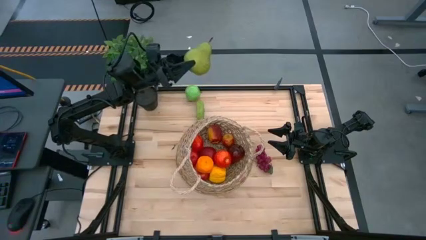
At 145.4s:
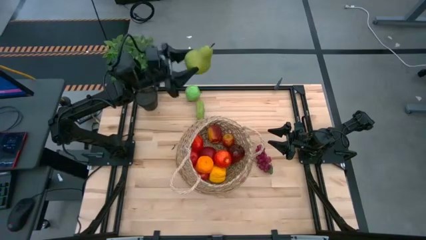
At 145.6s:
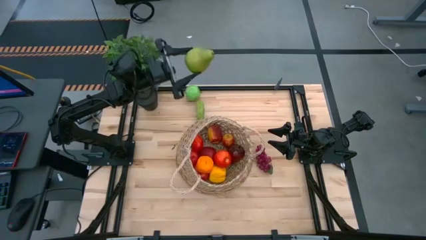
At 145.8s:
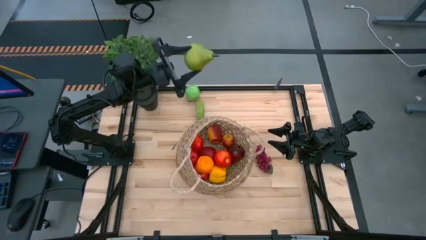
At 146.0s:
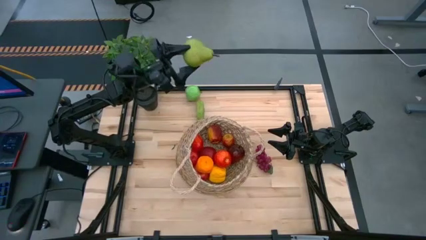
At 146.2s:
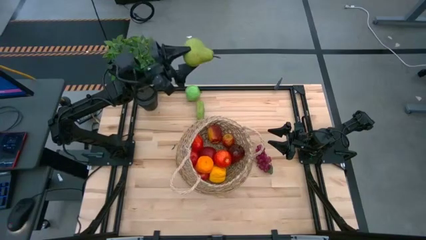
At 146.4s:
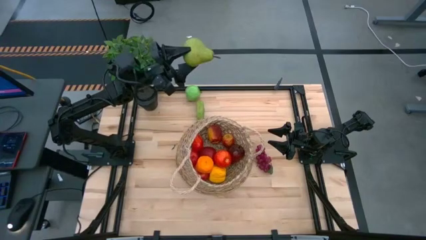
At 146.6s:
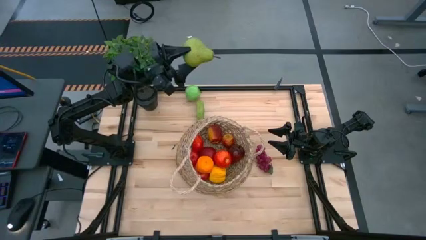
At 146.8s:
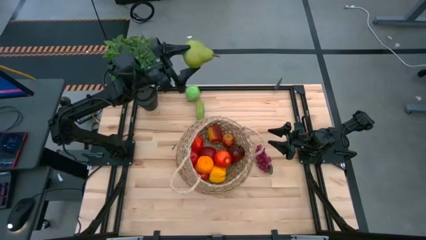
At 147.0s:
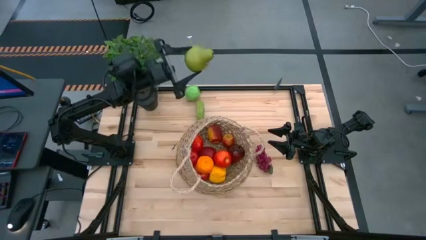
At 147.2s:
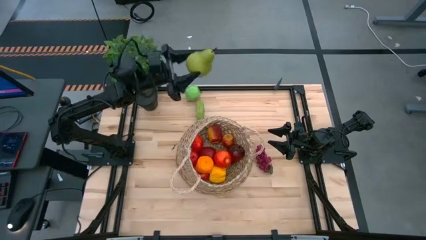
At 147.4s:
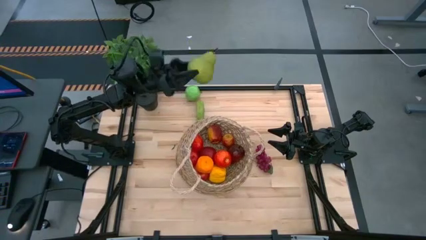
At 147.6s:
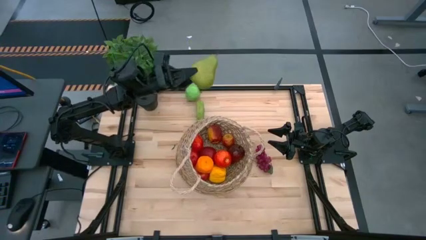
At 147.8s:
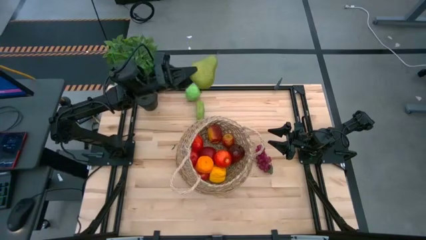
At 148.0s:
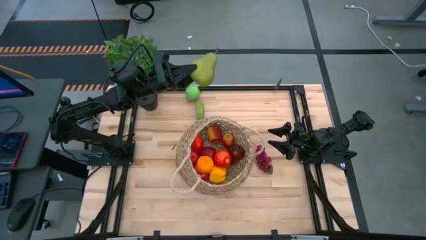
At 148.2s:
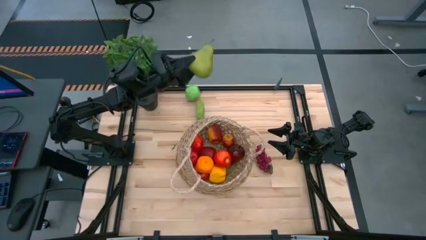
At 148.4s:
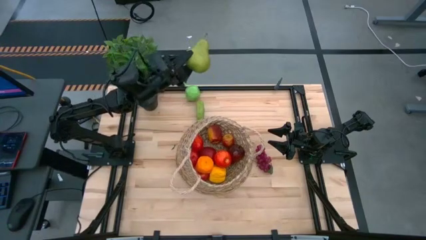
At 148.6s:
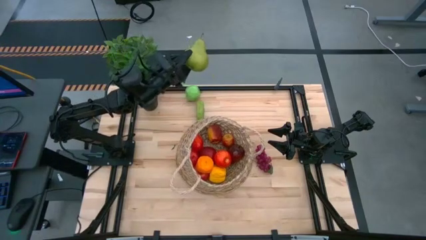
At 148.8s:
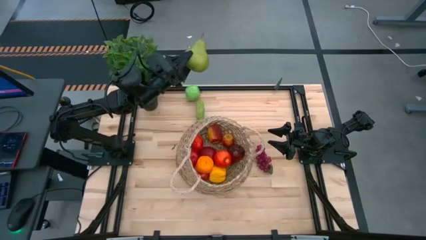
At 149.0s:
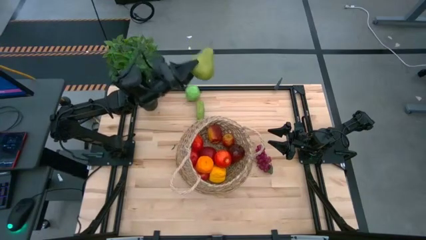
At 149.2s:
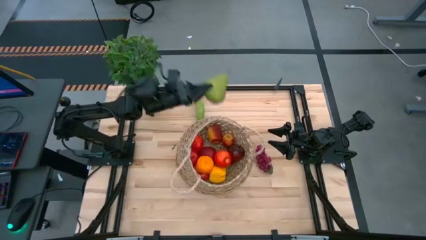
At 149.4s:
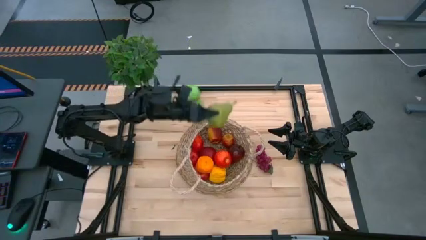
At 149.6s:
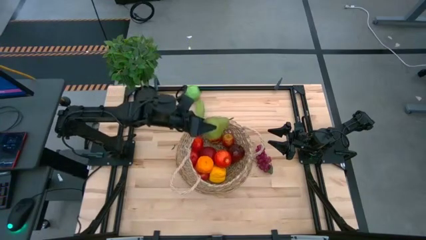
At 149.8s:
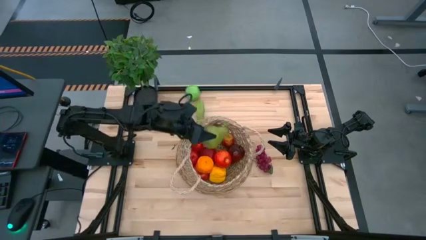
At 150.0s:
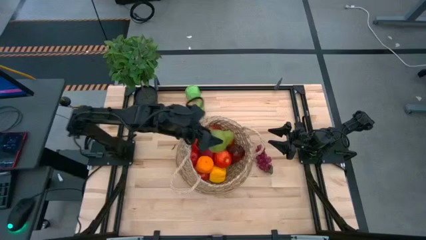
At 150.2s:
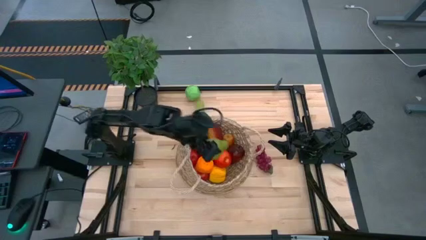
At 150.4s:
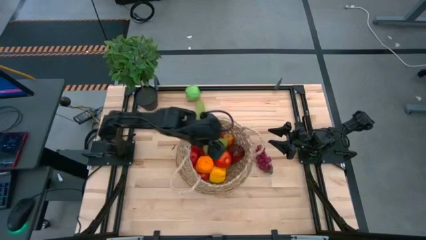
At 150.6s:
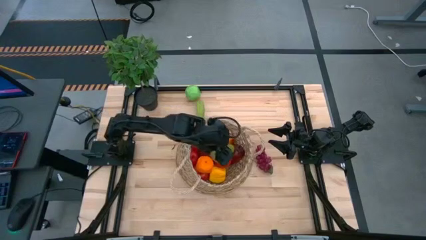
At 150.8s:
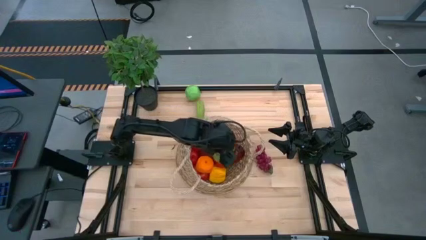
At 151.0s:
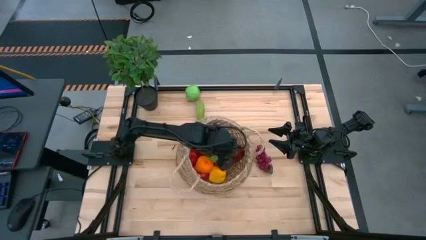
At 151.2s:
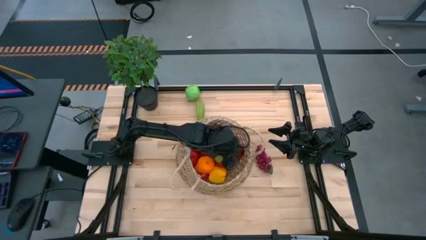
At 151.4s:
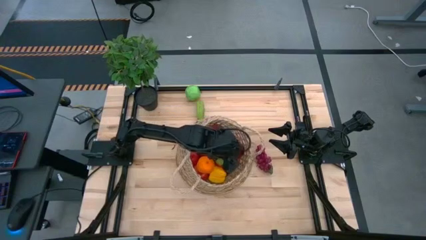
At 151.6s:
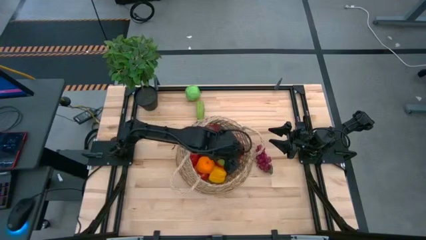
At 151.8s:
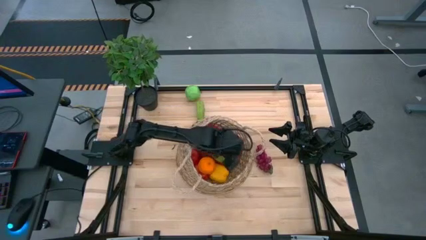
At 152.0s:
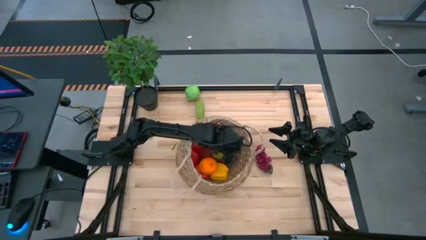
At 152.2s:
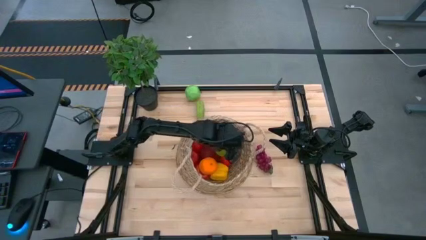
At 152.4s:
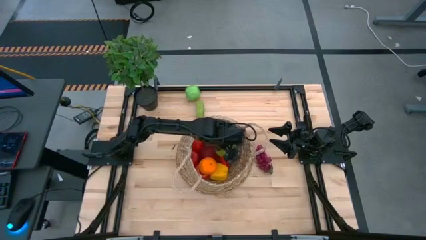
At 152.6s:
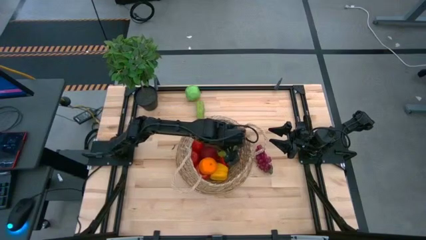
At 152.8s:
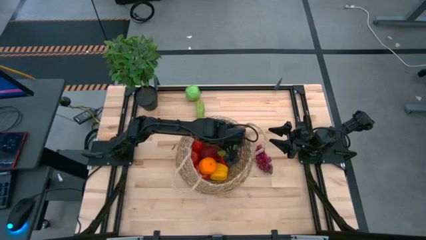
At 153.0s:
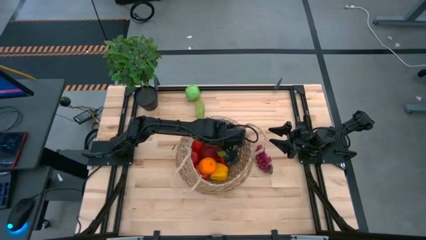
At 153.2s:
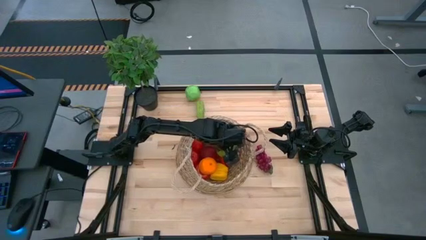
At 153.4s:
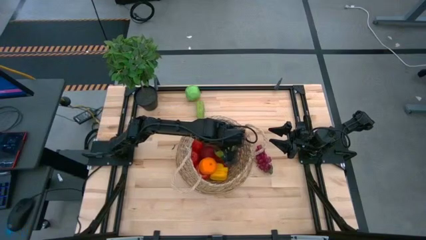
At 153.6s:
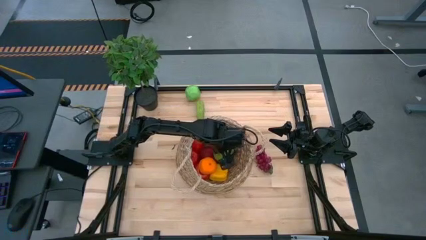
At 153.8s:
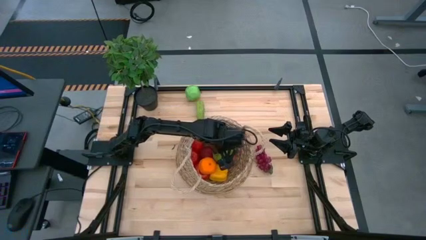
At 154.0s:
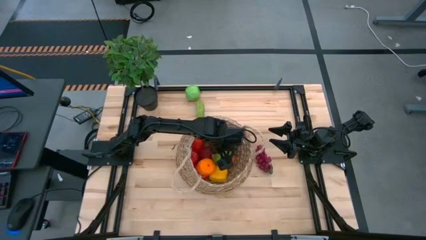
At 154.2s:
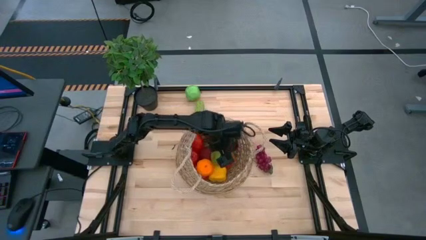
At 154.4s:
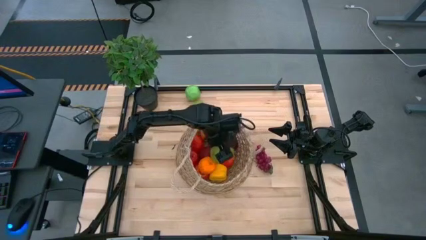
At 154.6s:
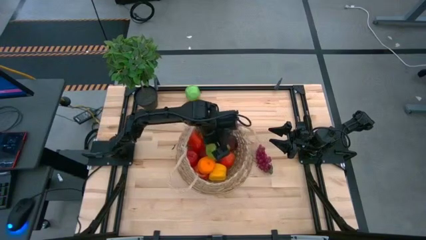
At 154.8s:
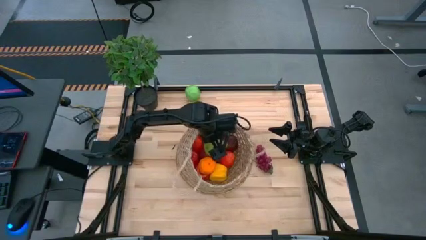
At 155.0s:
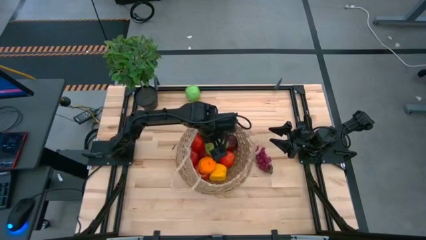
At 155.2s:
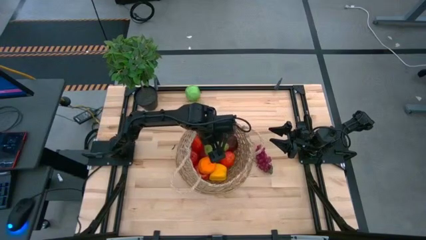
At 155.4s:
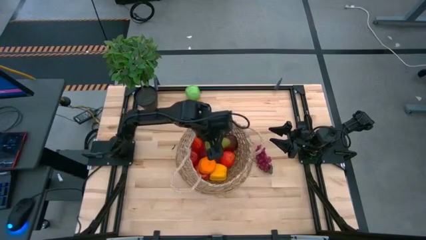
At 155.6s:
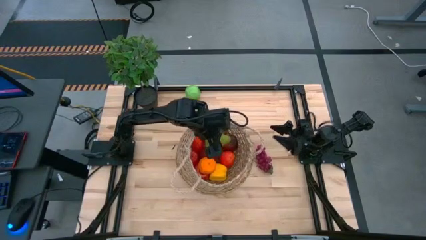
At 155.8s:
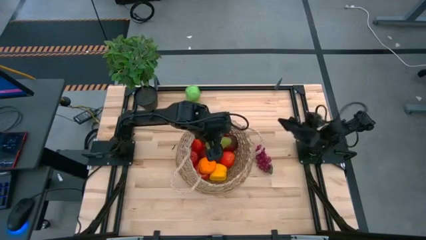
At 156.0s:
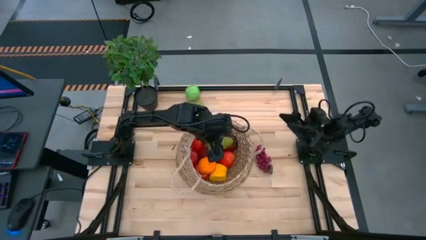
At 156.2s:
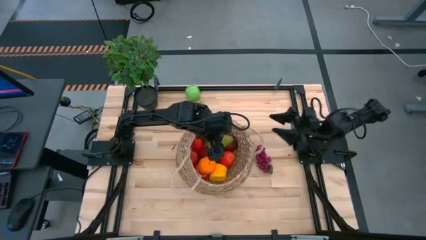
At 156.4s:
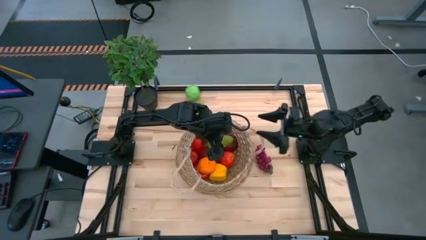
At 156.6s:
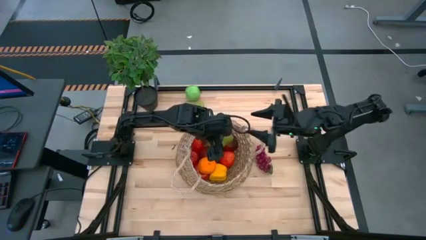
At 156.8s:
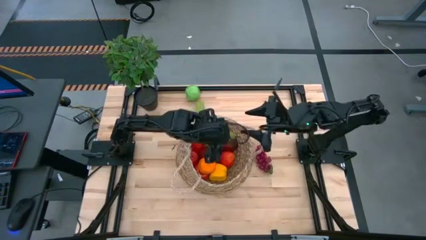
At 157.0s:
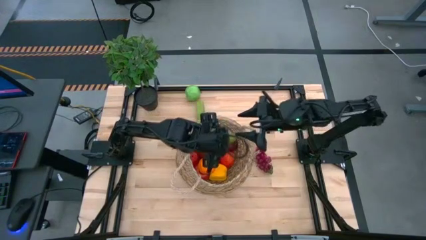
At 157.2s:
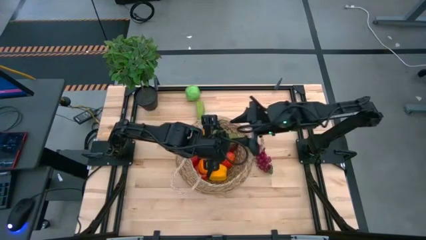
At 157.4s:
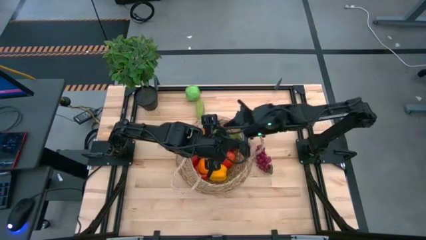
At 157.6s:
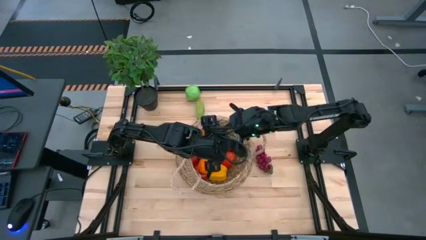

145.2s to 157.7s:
Task: Build produce basket
Put the pear into the woven basket

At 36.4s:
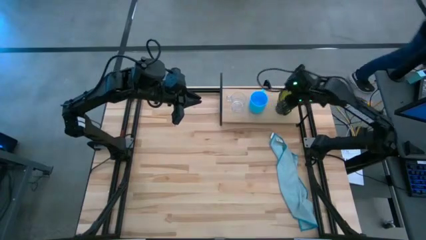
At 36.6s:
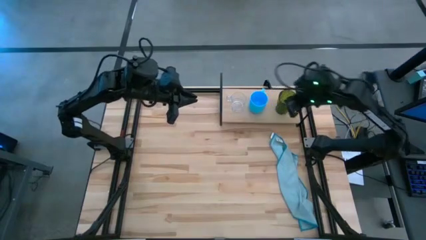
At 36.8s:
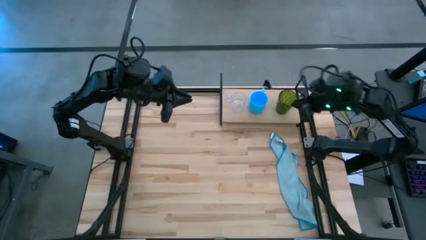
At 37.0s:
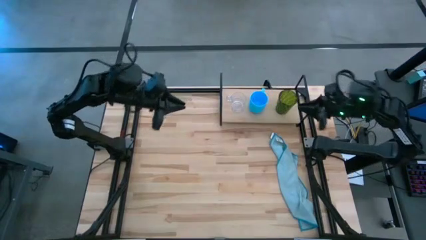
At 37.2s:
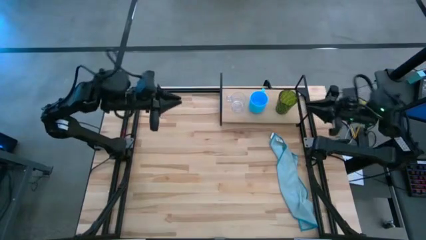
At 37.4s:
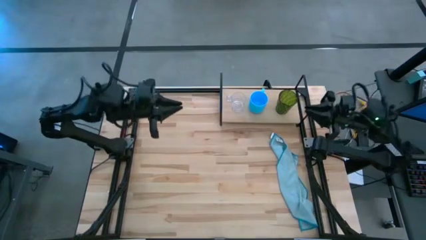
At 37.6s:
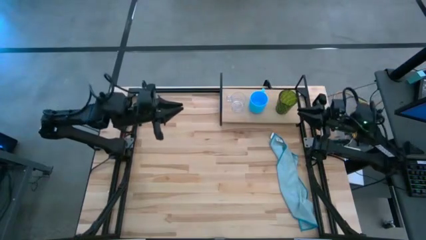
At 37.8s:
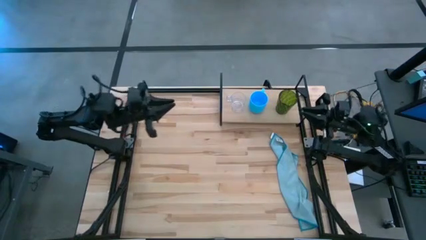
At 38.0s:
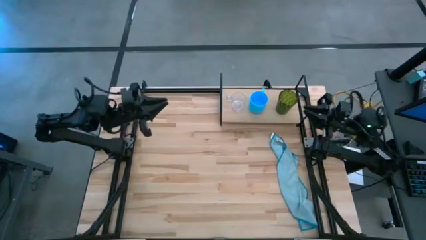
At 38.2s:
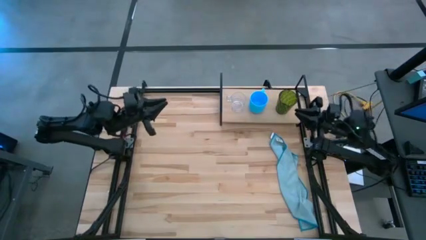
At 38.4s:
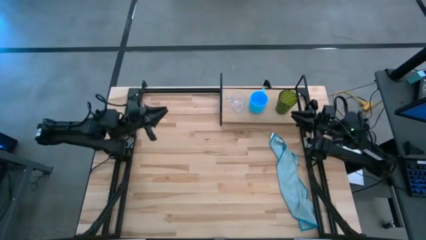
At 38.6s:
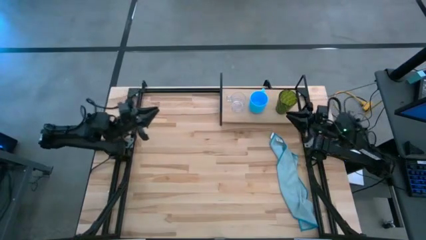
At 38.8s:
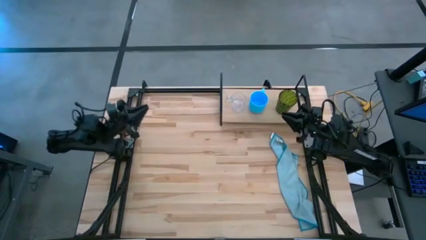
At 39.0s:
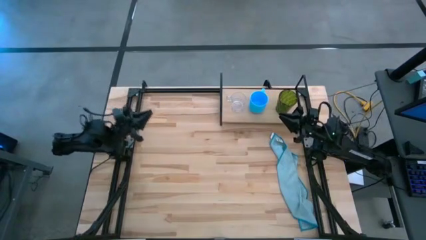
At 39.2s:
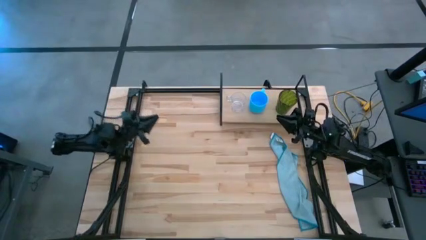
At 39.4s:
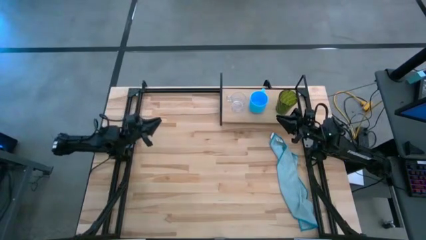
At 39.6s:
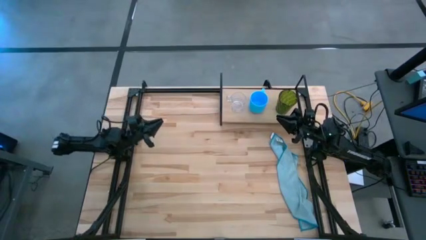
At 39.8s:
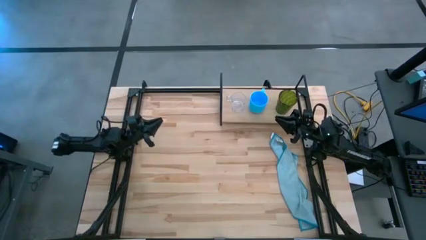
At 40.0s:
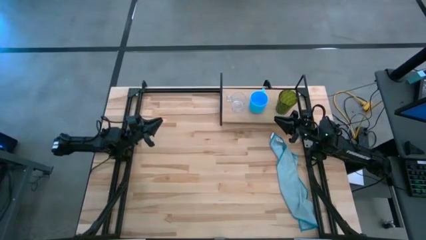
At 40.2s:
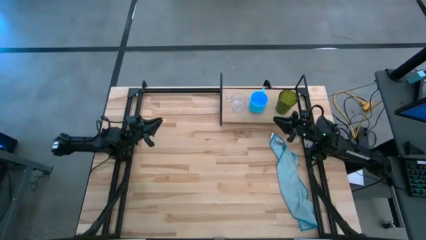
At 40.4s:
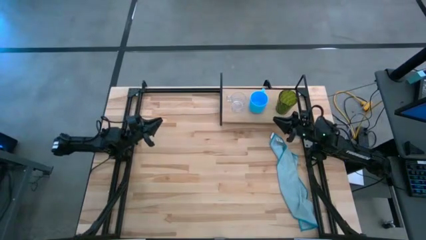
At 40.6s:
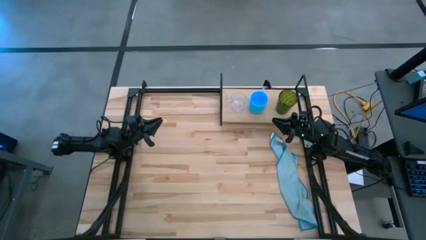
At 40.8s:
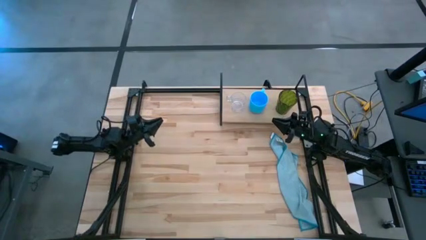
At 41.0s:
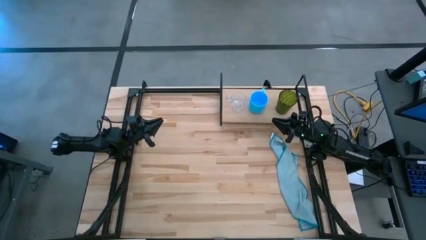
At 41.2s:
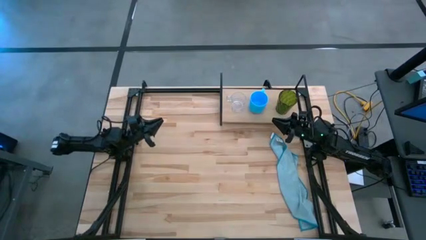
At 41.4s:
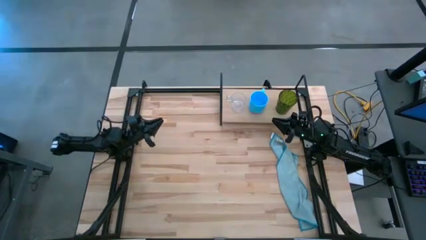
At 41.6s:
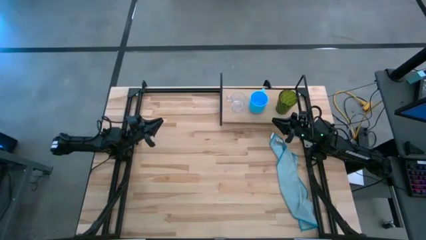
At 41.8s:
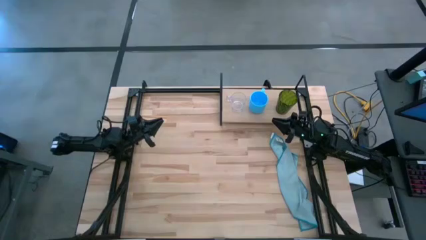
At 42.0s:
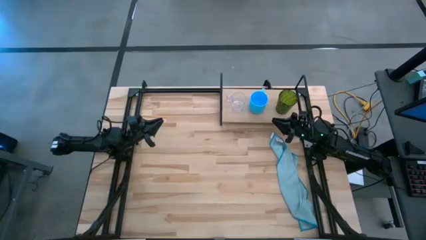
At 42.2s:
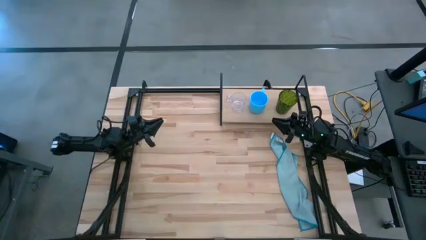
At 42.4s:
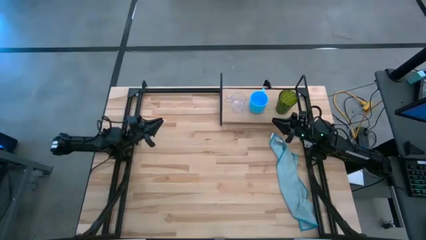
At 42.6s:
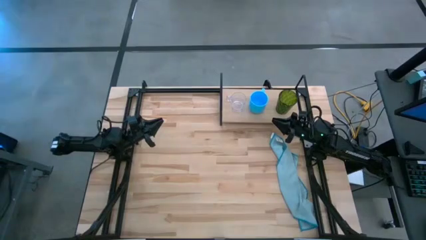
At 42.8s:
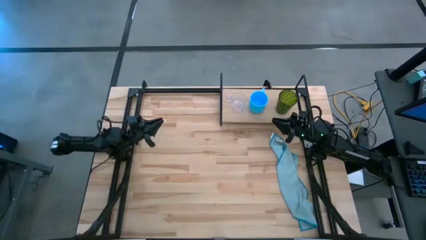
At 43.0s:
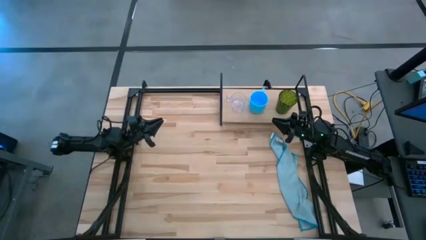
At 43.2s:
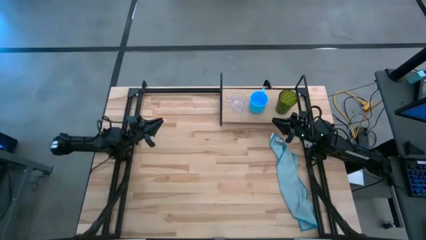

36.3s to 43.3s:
Task: Stack small to large cups/mugs on shelf
Return to Home Position
